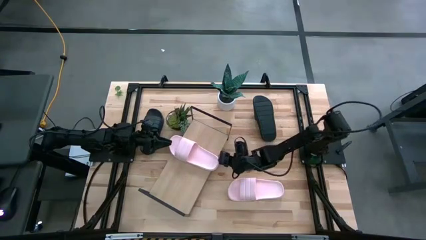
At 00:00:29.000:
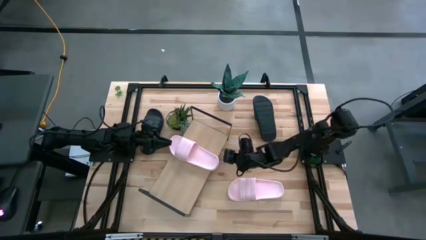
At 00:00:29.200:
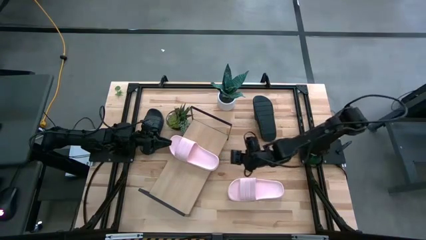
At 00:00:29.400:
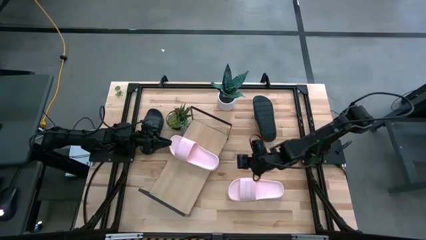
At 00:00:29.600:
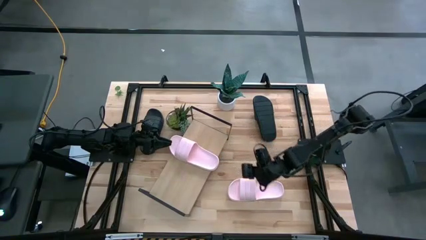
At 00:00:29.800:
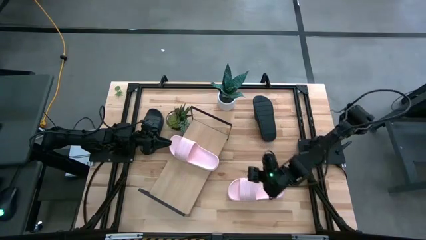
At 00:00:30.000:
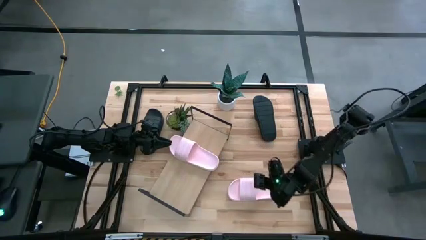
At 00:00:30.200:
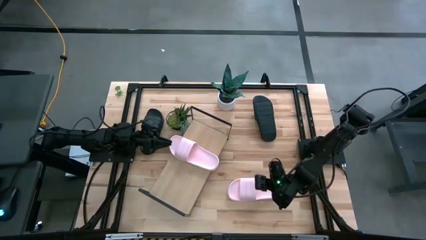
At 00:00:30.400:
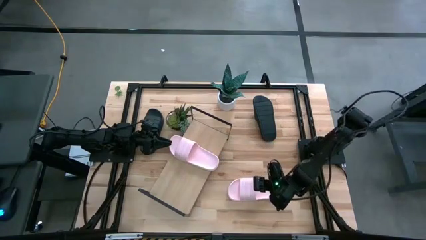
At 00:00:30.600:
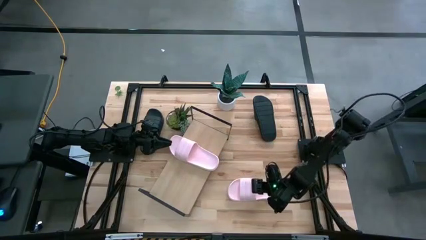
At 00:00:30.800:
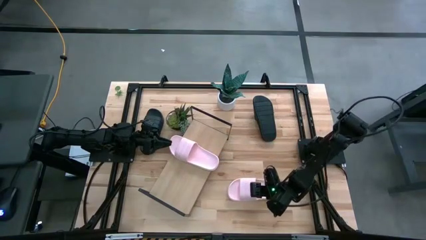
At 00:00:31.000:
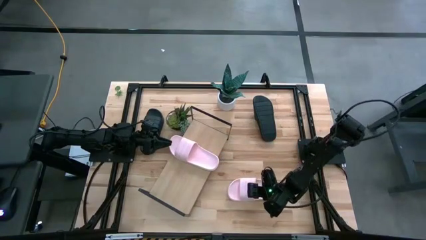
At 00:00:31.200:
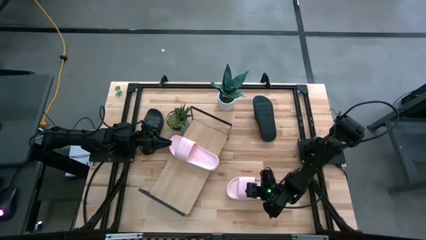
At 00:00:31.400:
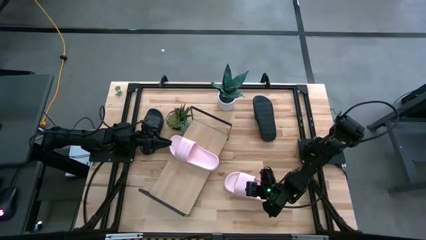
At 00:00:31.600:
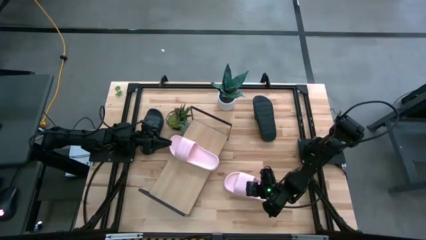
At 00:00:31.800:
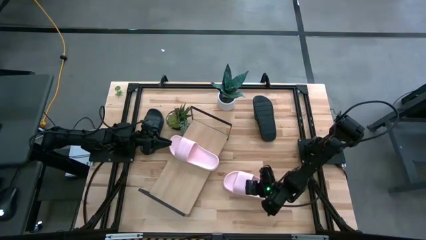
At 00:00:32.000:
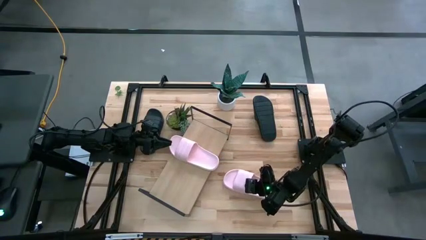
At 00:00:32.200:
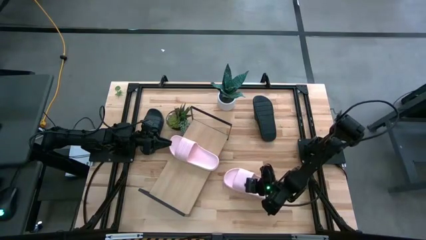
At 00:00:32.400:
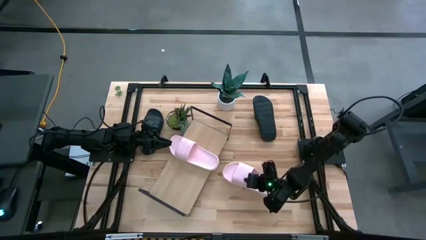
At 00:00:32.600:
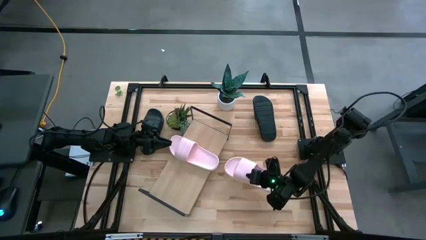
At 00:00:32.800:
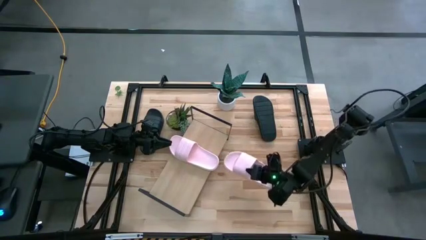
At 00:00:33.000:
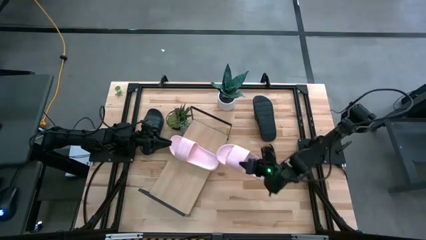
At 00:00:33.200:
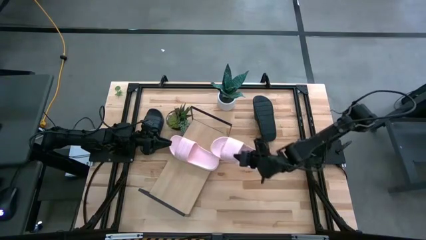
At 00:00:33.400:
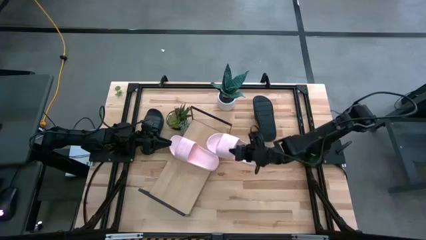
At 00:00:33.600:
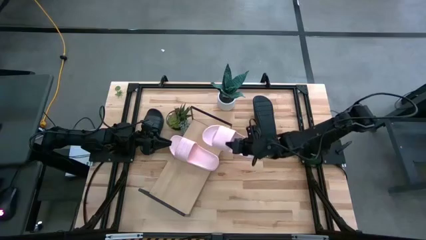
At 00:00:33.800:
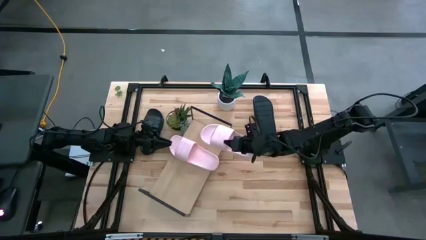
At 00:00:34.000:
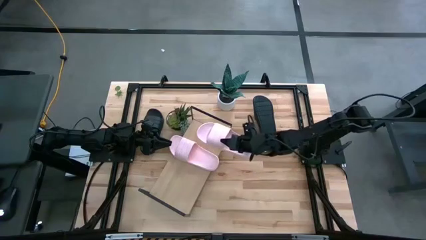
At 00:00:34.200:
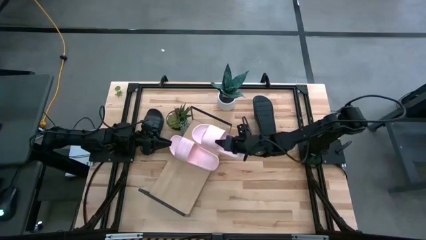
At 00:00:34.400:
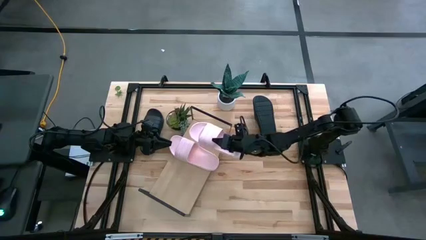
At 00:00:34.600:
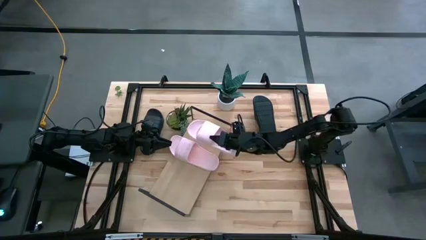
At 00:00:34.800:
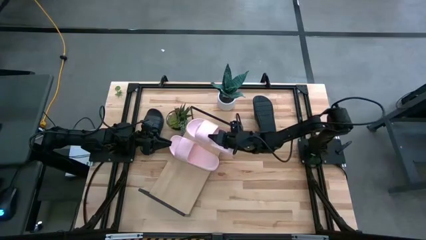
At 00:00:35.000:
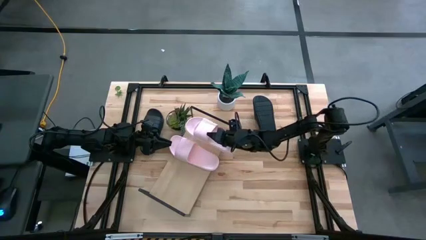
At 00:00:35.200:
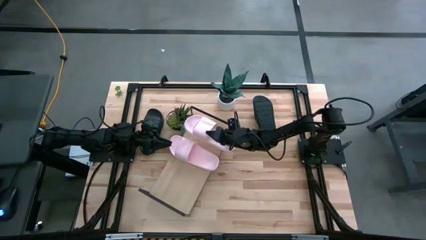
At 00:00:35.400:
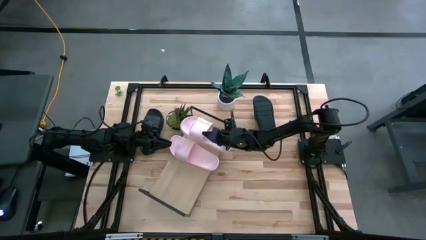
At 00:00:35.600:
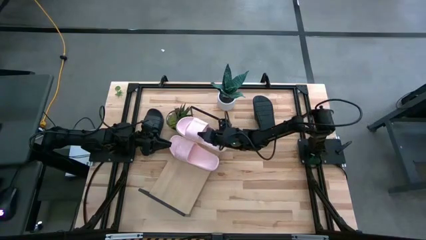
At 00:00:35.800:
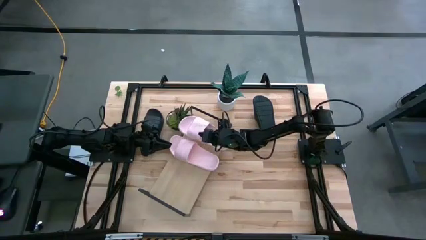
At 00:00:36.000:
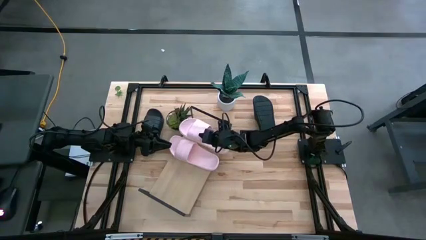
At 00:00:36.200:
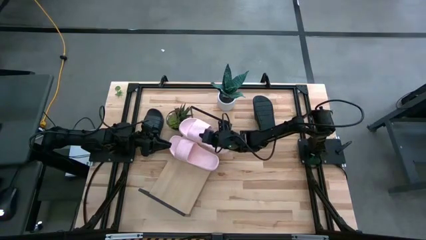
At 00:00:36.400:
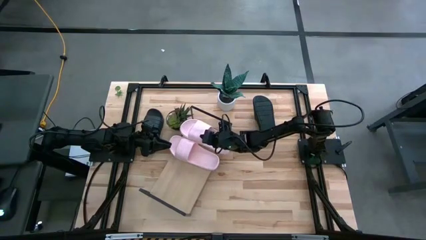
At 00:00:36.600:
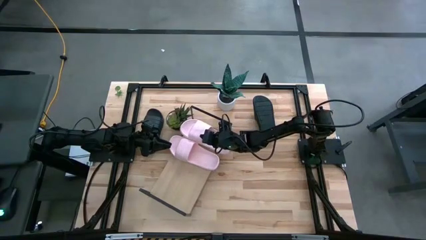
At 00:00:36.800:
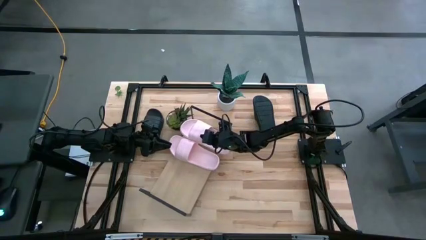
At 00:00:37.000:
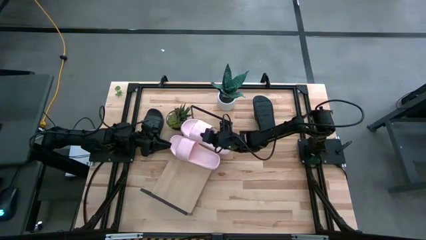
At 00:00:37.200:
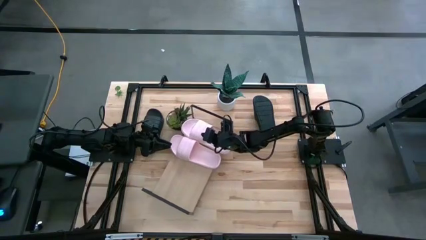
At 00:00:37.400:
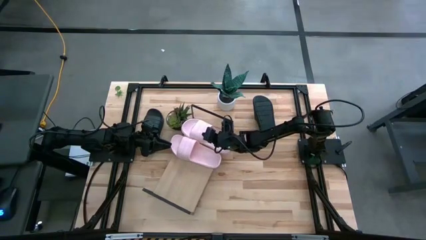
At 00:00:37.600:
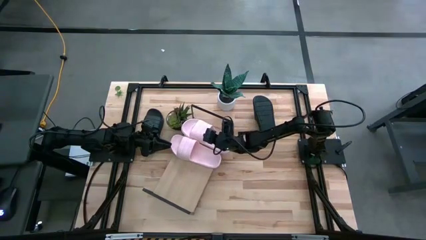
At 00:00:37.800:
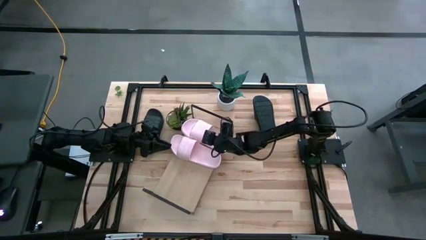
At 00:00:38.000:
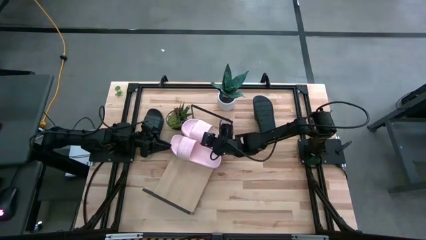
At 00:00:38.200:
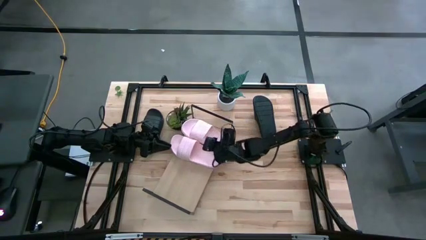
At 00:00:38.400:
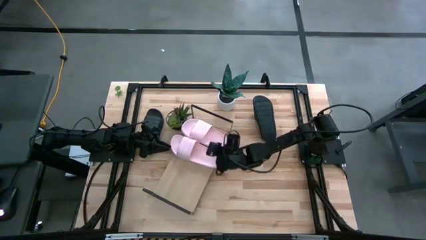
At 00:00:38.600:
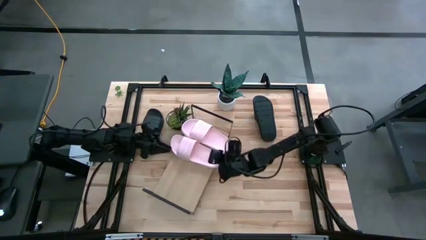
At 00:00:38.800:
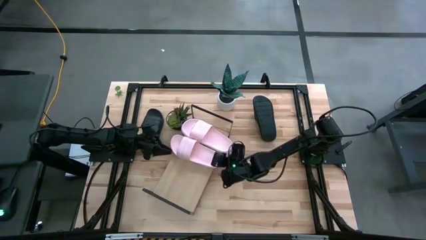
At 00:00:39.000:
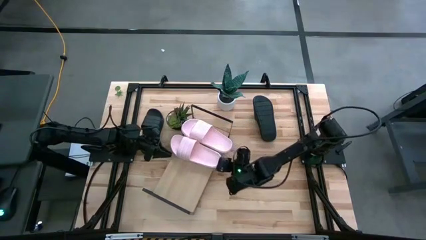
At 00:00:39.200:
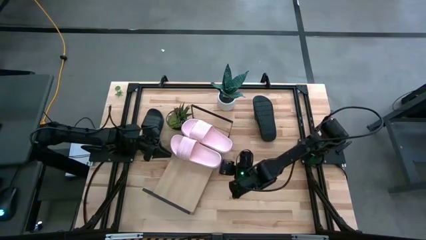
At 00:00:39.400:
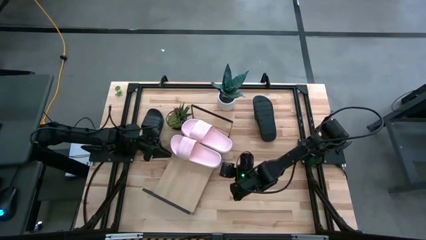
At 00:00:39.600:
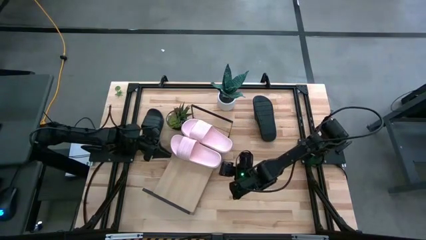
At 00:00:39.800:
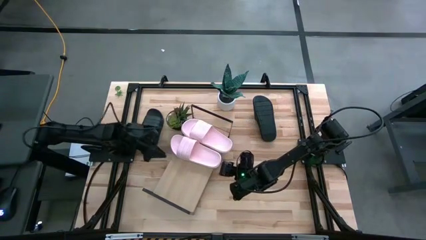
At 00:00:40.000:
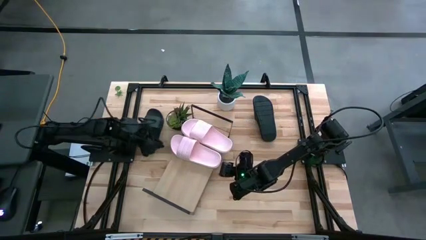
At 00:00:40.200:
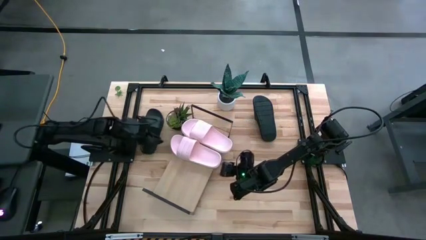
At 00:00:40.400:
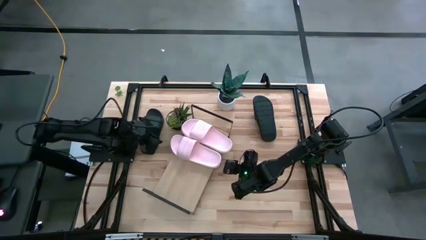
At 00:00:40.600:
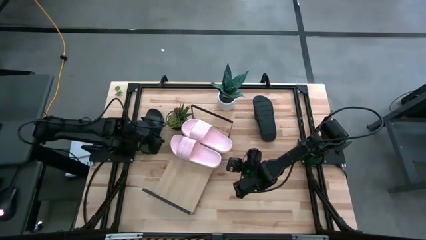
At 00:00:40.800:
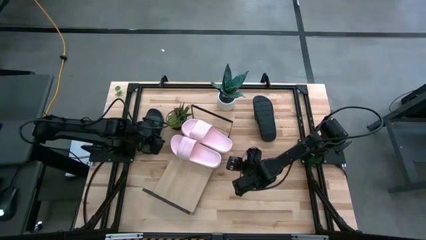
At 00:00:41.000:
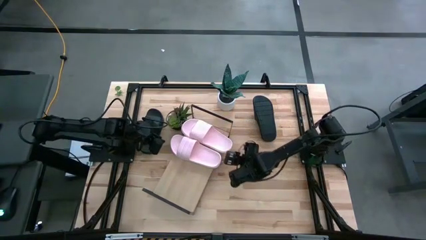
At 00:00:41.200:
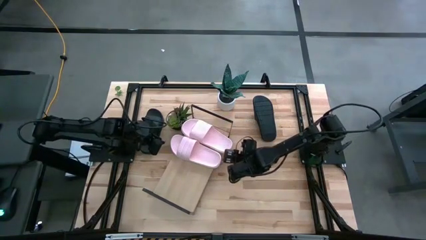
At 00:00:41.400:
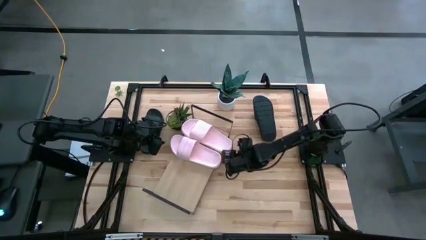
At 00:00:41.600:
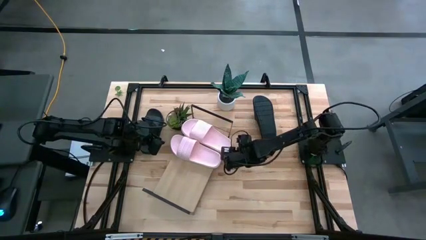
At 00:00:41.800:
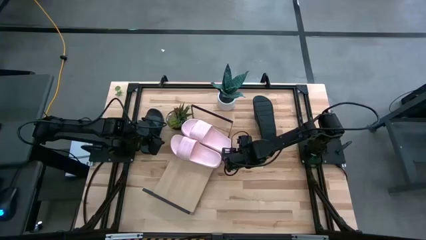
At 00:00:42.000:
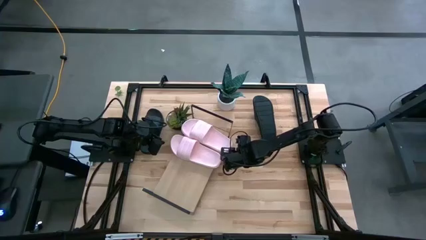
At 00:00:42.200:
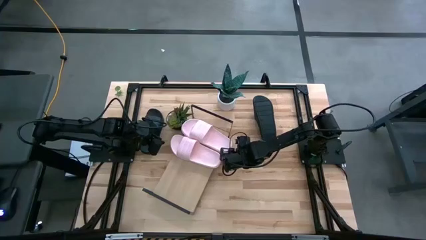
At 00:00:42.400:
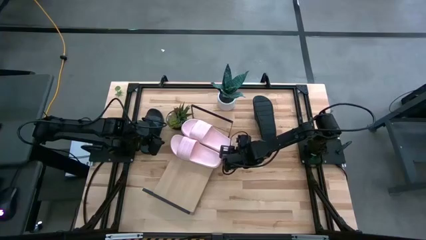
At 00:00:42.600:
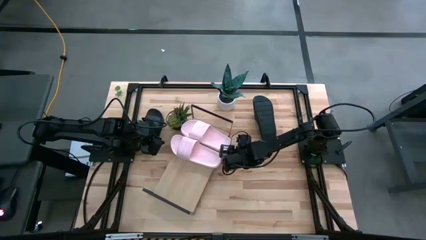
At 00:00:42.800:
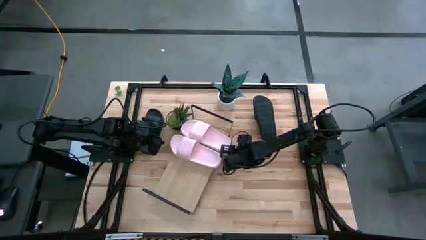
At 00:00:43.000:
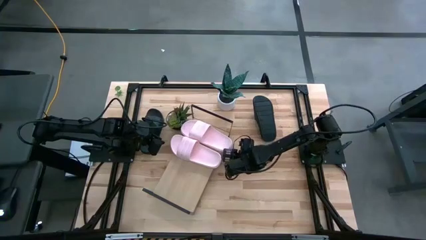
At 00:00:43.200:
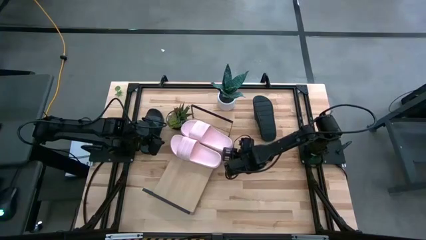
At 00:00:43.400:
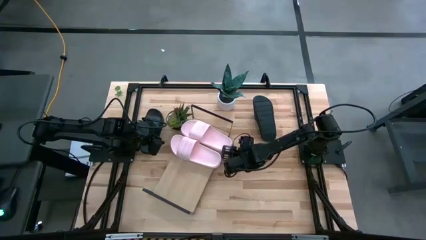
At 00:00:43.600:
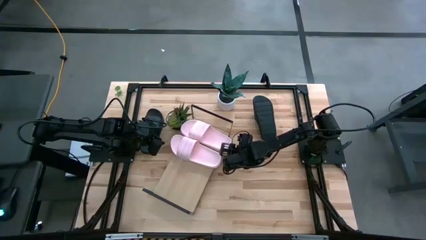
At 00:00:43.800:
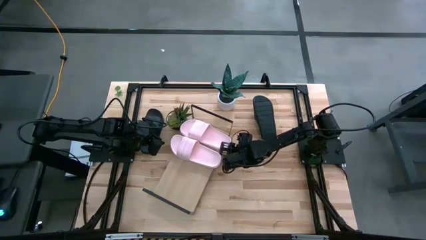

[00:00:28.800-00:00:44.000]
Task: Pick and place slides into the shelf
Put the pink slide on the shelf

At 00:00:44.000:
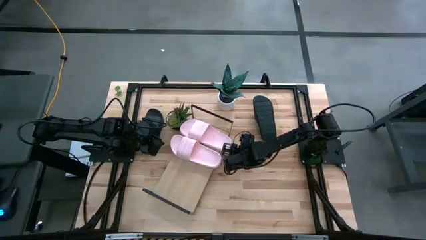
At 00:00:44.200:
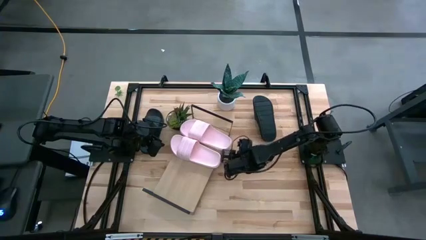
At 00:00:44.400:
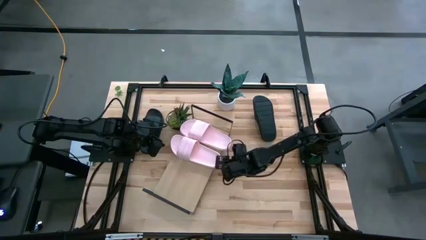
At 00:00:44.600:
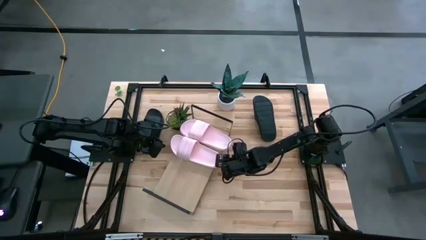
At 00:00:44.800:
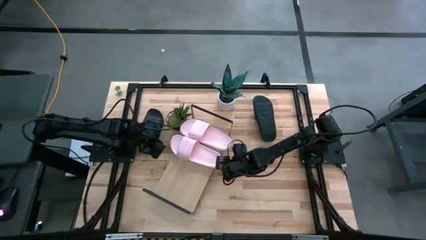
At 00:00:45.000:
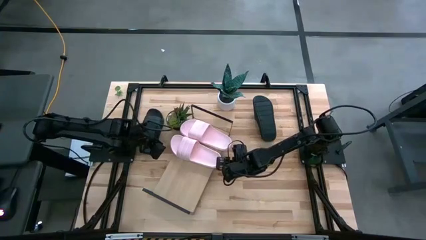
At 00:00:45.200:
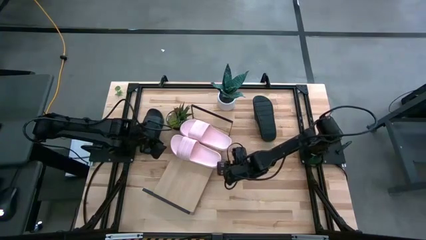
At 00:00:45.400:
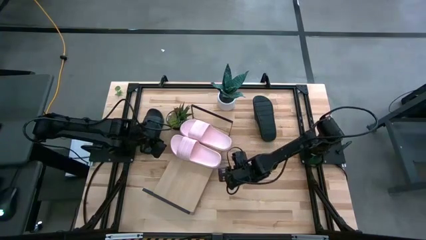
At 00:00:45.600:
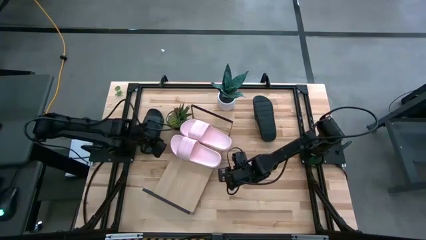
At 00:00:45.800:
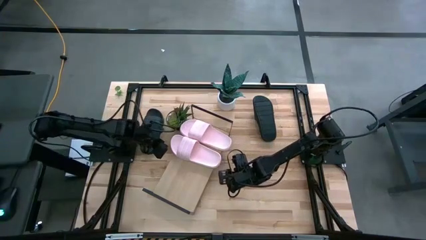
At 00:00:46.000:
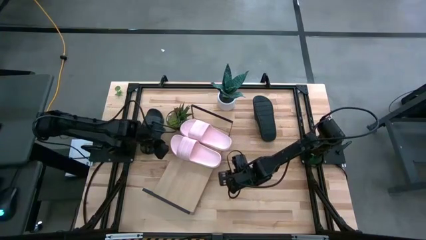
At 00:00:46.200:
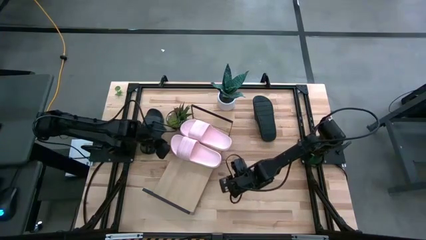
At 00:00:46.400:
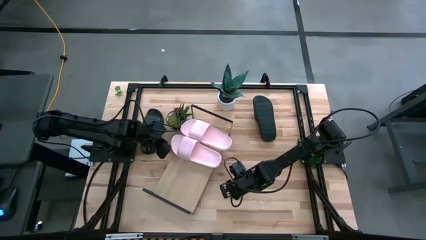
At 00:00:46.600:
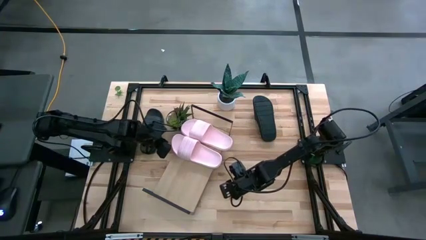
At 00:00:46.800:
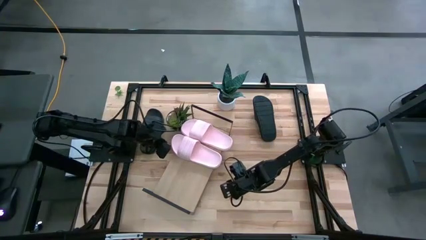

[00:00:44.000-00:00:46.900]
Adjust the pink slide on the shelf
